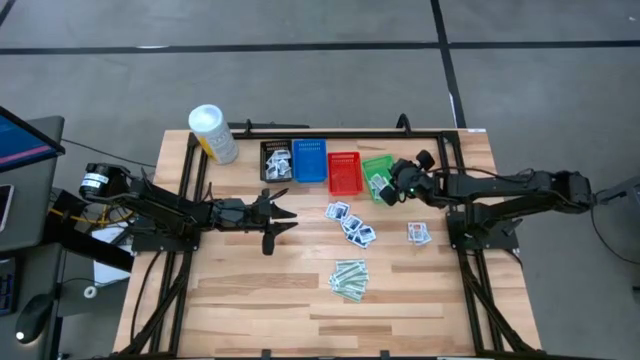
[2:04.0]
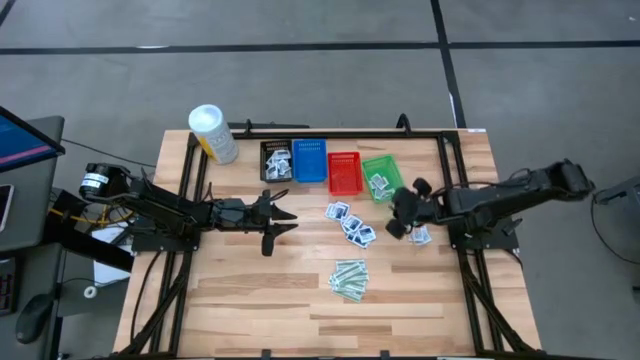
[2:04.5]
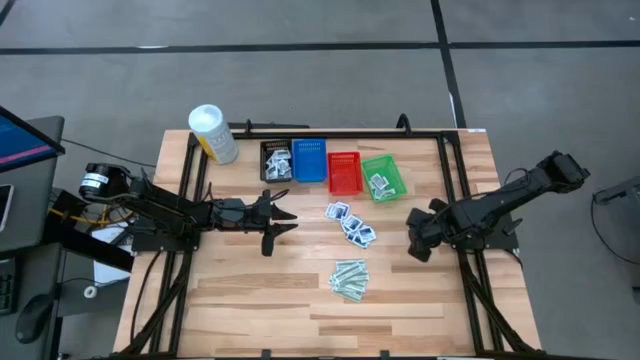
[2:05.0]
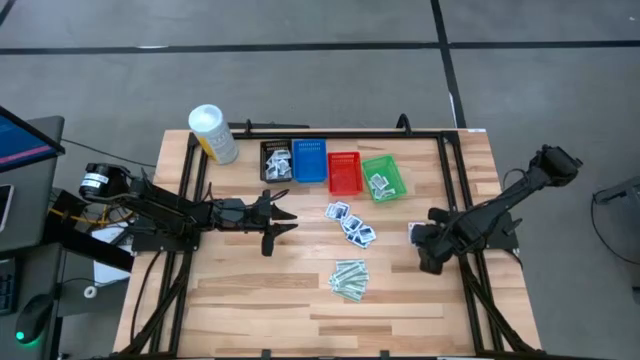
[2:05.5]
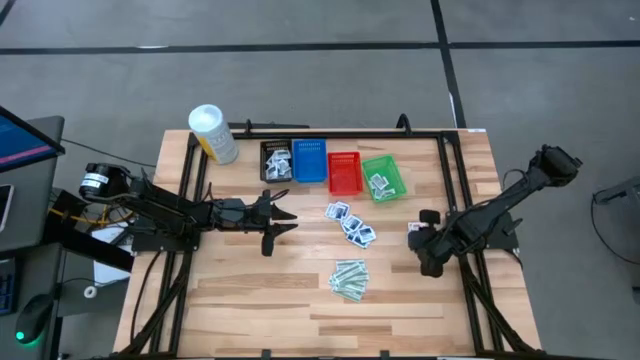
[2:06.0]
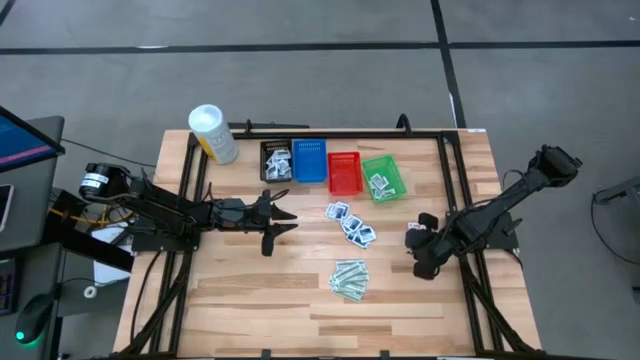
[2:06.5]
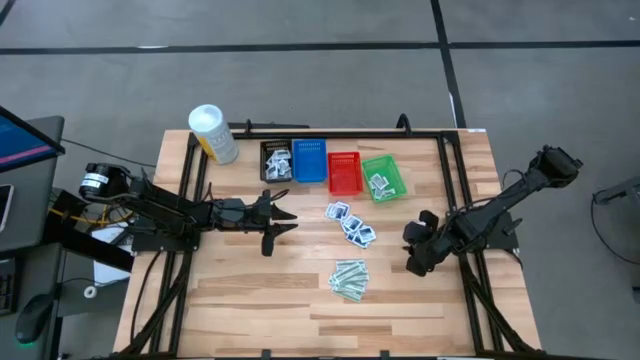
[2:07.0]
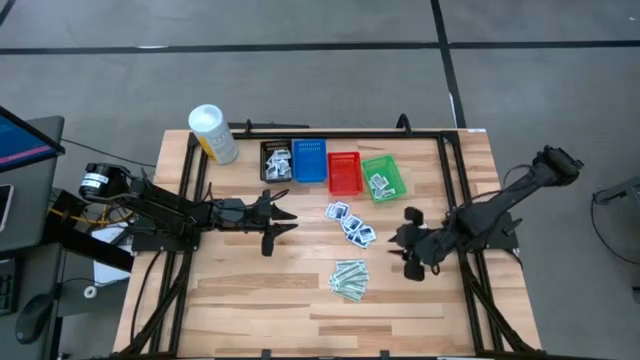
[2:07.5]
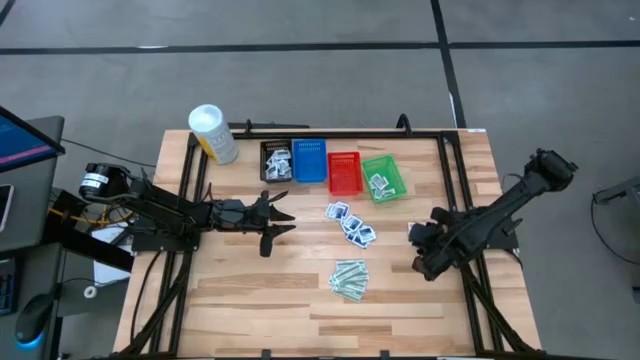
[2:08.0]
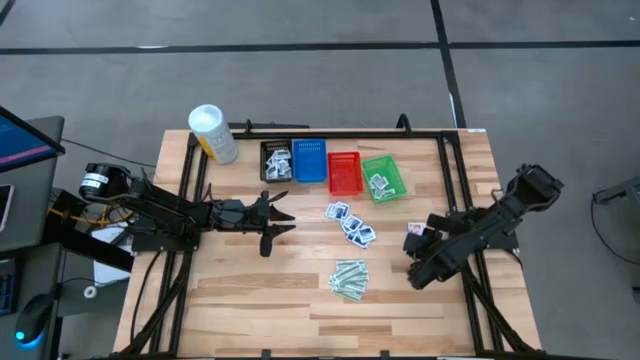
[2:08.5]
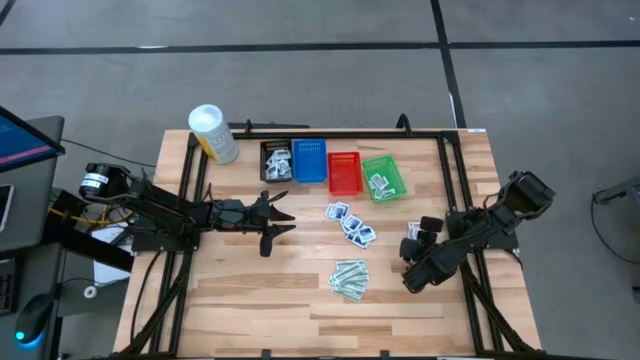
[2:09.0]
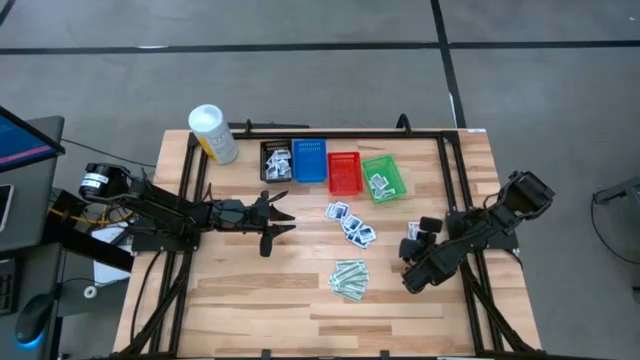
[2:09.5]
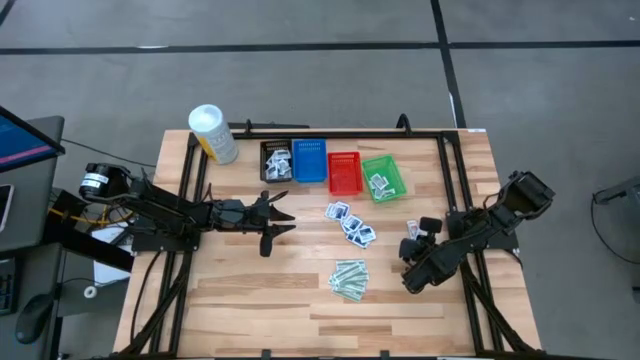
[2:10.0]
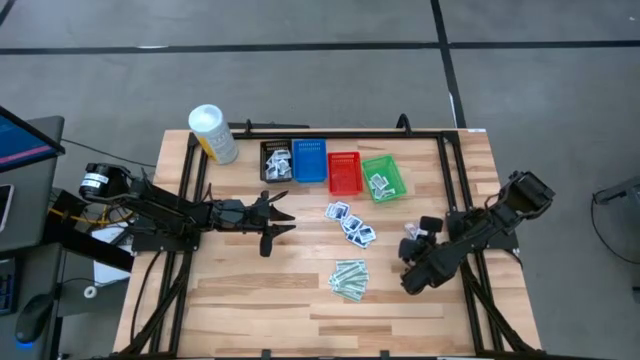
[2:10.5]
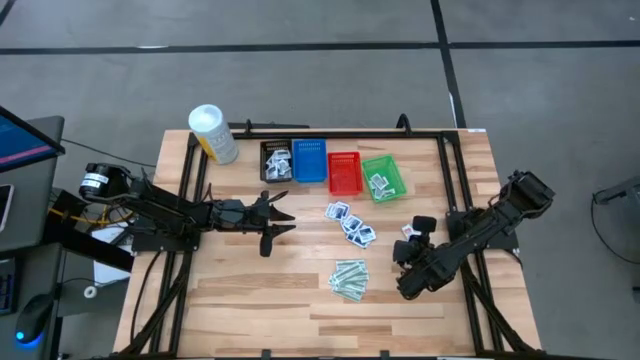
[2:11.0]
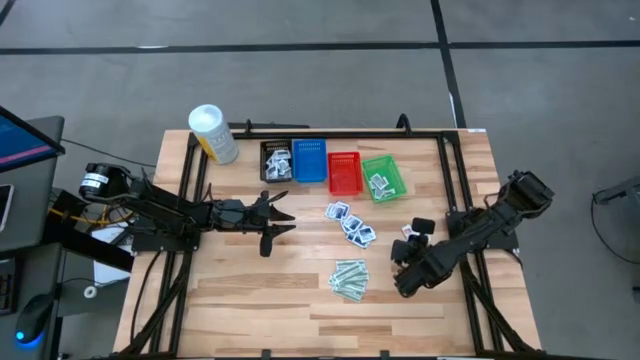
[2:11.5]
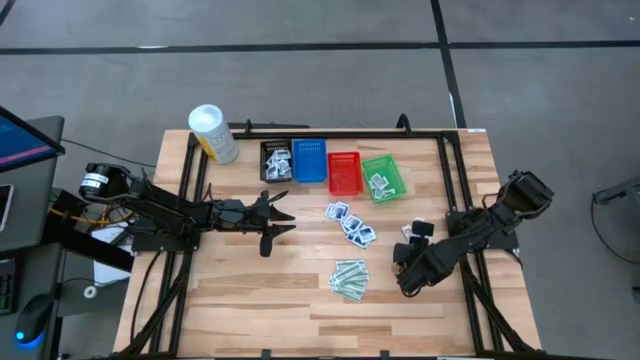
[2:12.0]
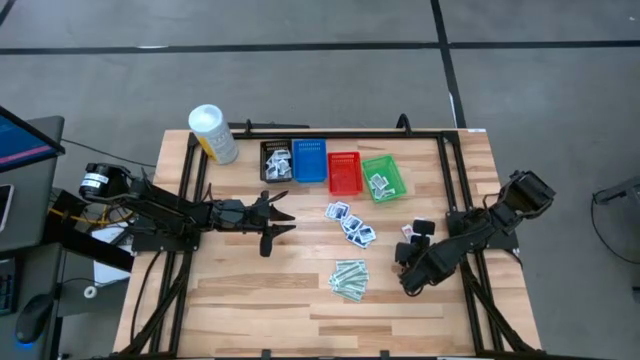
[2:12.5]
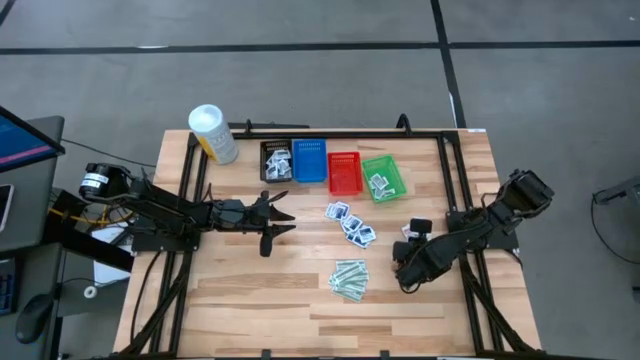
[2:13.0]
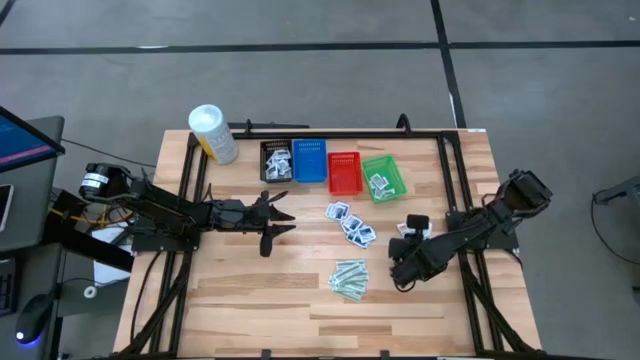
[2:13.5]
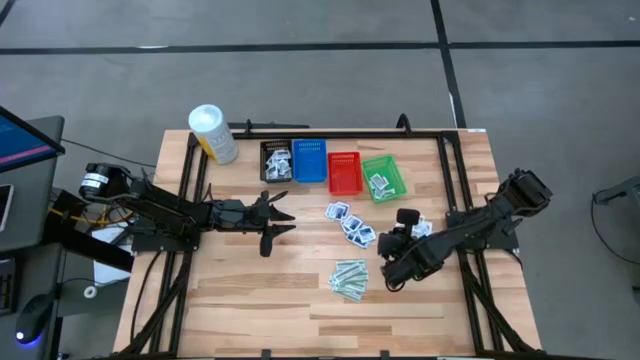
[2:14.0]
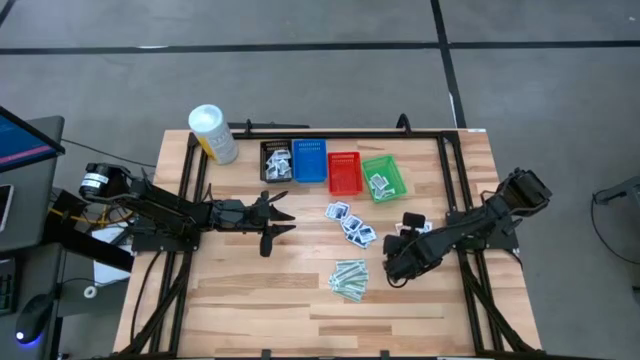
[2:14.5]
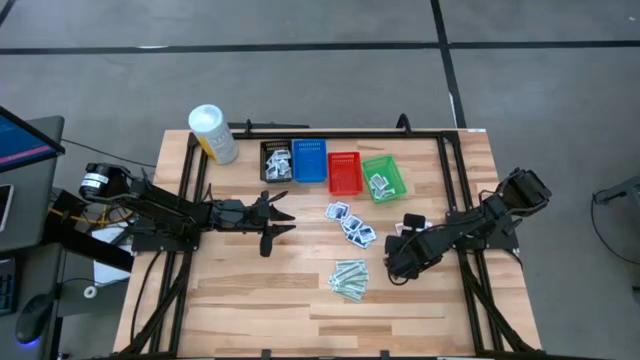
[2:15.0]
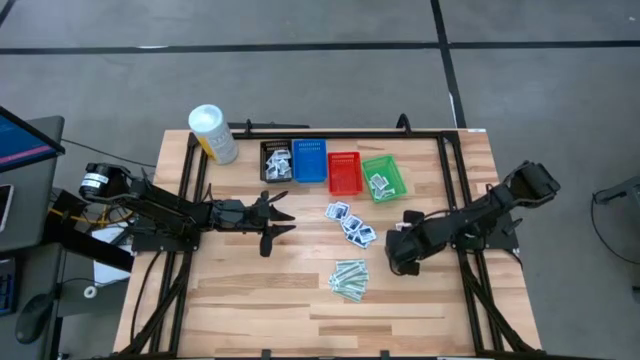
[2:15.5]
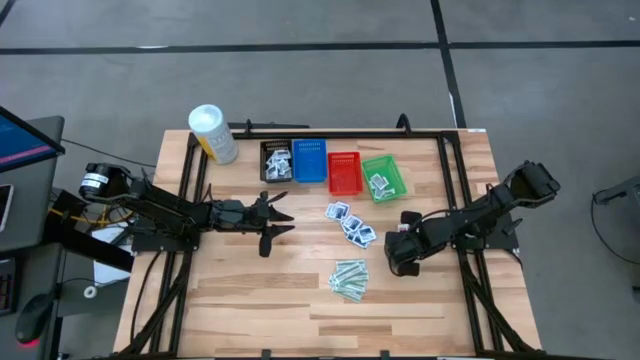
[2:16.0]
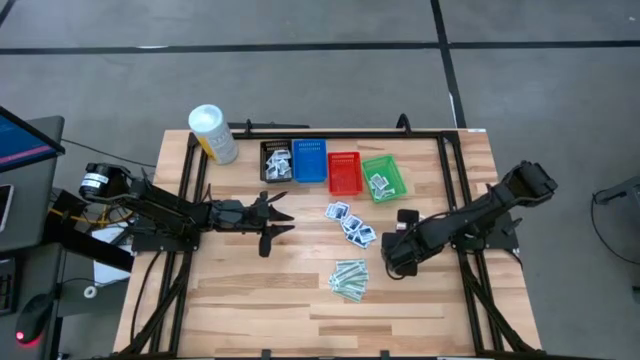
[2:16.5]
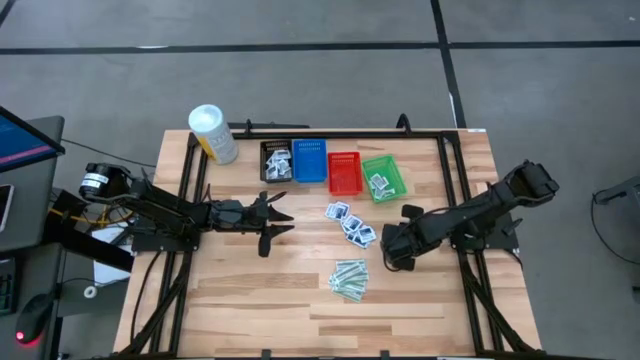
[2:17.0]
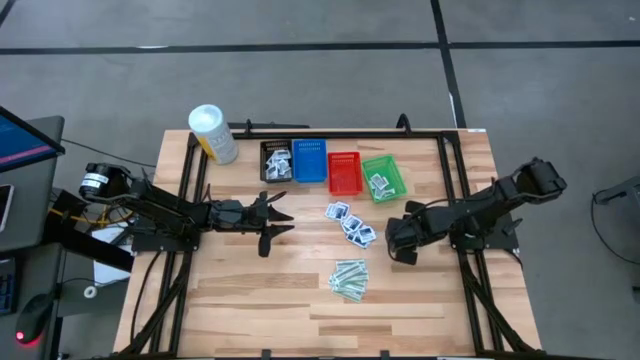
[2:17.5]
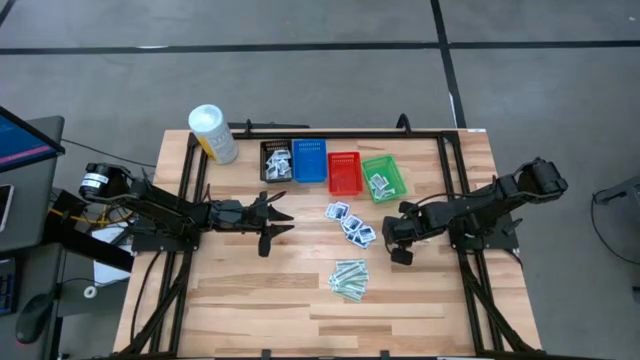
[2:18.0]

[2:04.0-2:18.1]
Task: Pick & Place First Aid Supplies
Put the orange pad into the green bin

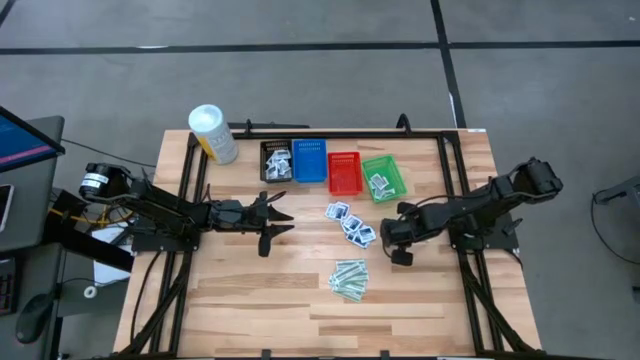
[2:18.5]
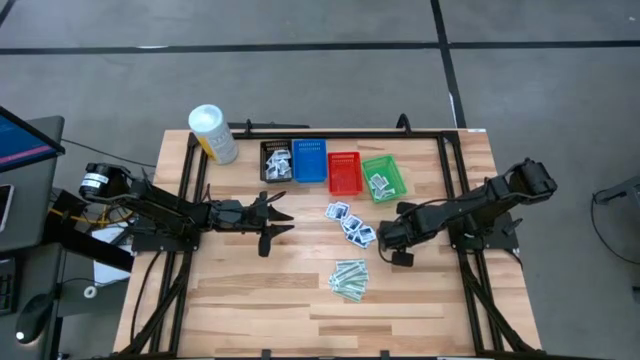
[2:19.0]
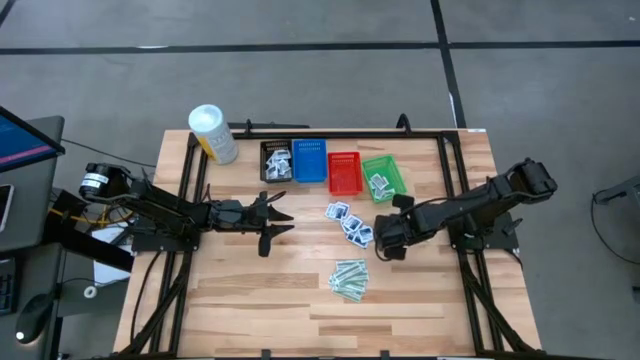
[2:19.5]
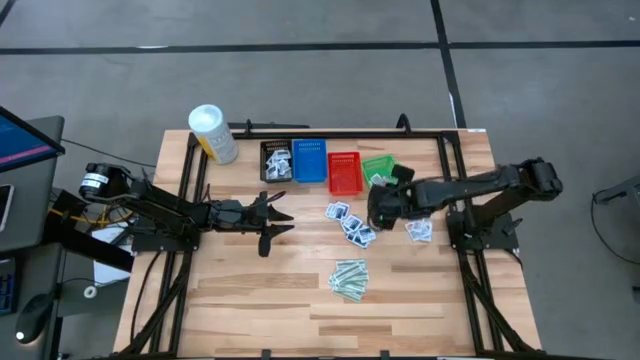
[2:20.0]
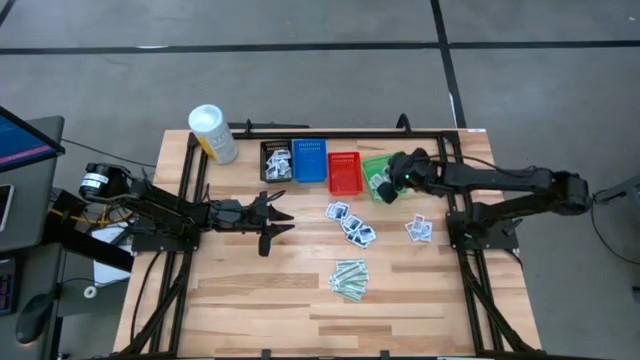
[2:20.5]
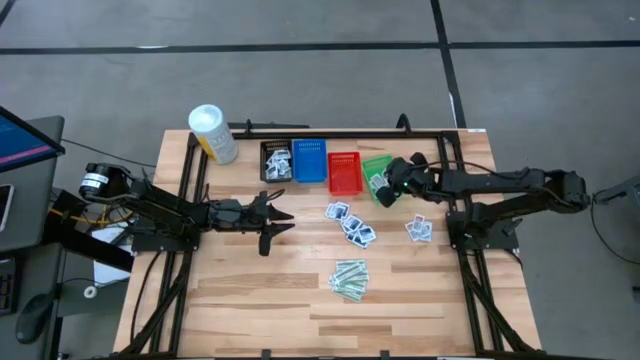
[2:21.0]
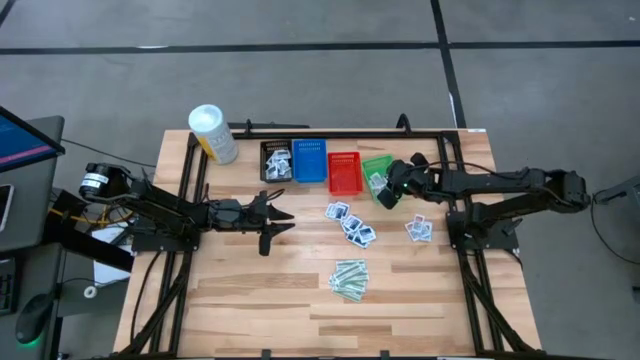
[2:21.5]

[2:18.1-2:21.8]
Put the orange pad into the green bin
